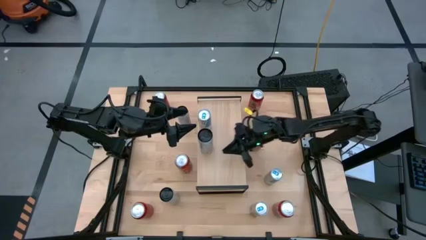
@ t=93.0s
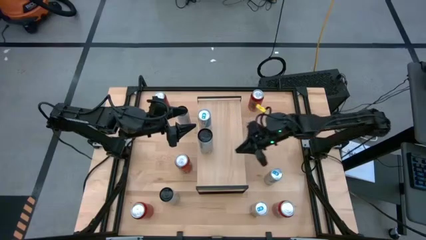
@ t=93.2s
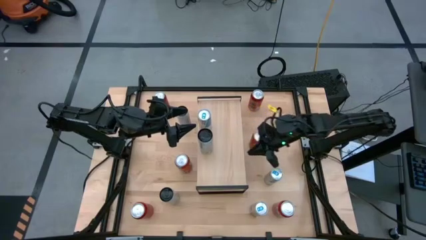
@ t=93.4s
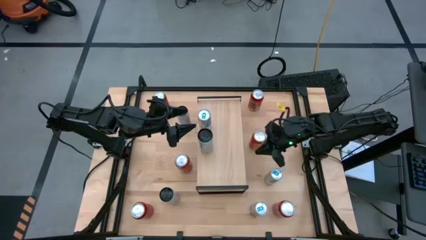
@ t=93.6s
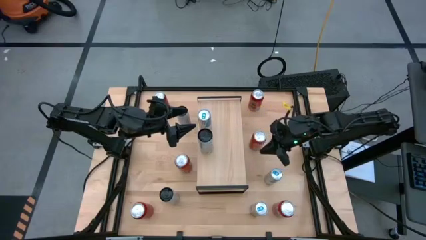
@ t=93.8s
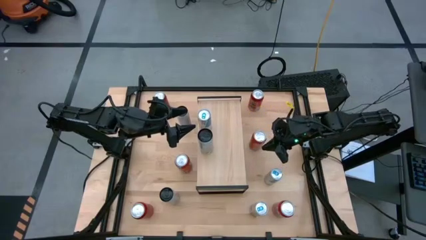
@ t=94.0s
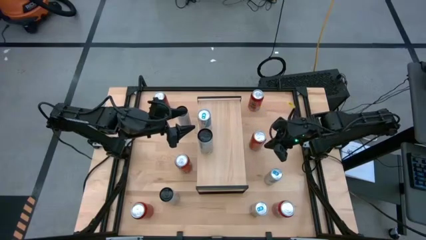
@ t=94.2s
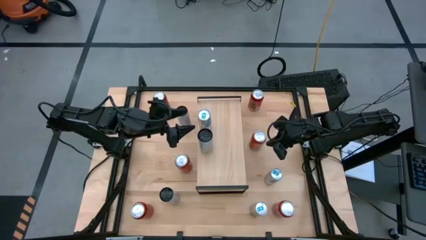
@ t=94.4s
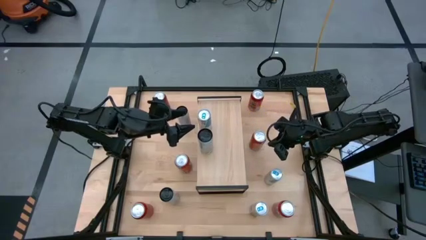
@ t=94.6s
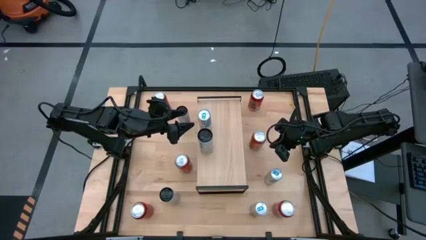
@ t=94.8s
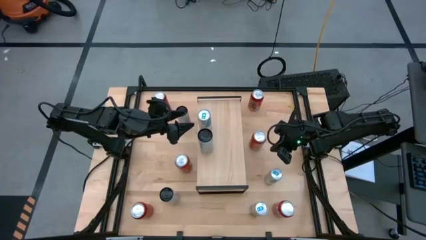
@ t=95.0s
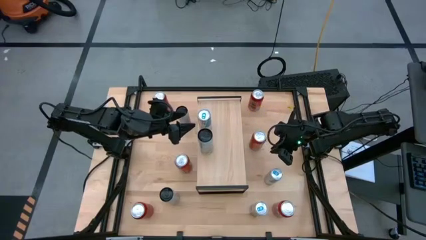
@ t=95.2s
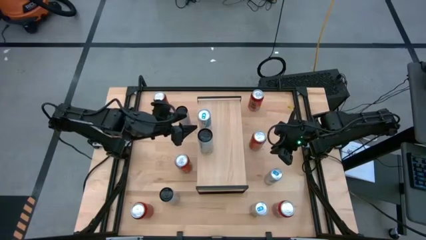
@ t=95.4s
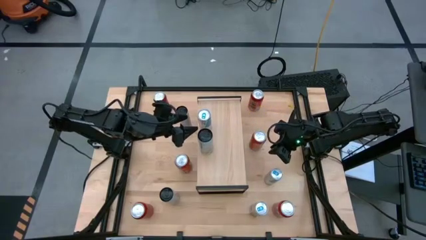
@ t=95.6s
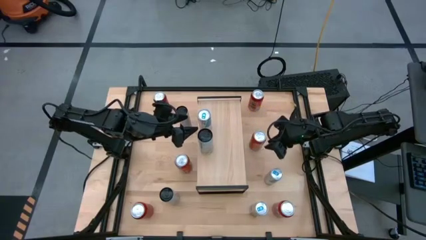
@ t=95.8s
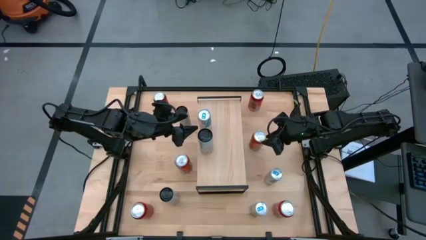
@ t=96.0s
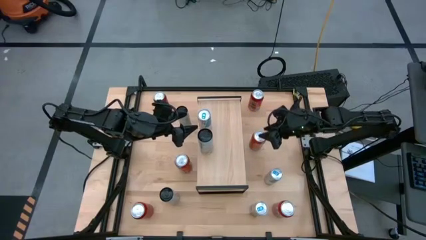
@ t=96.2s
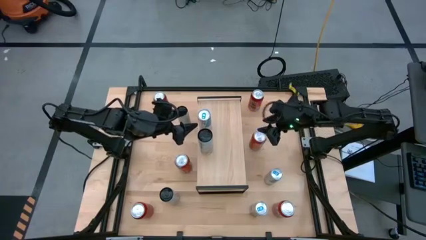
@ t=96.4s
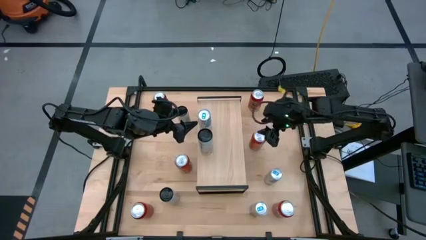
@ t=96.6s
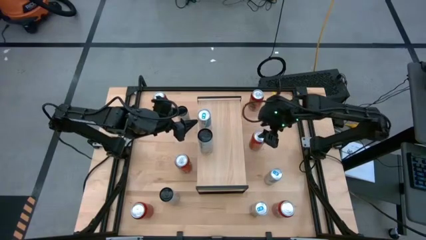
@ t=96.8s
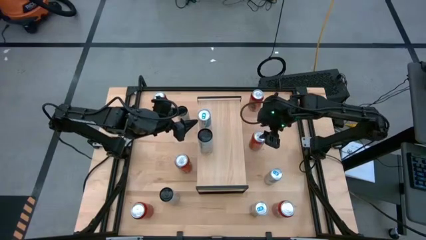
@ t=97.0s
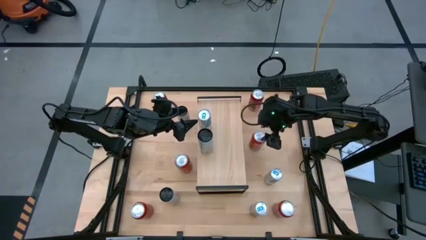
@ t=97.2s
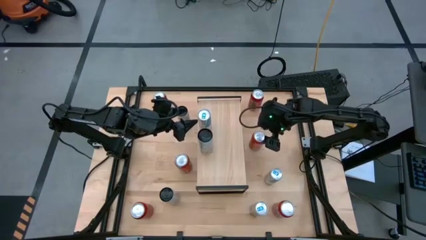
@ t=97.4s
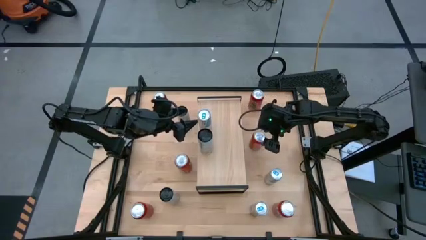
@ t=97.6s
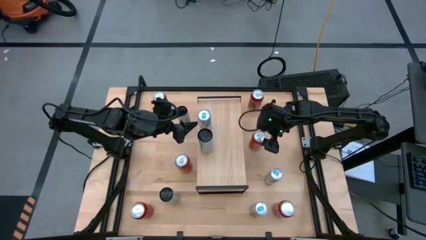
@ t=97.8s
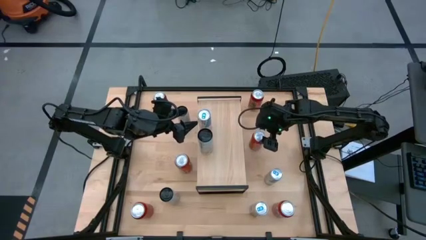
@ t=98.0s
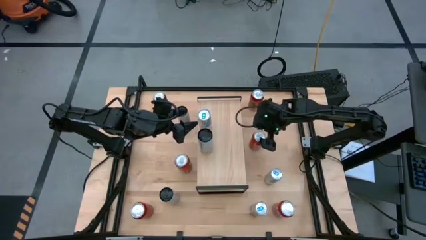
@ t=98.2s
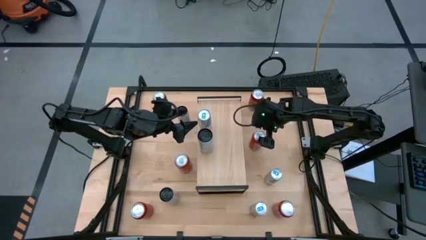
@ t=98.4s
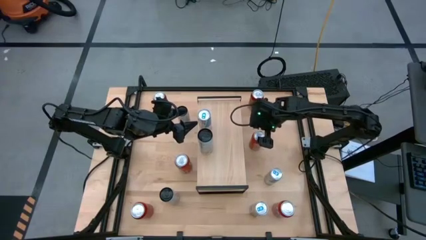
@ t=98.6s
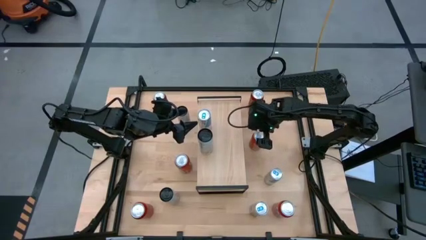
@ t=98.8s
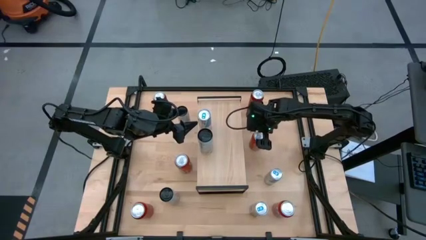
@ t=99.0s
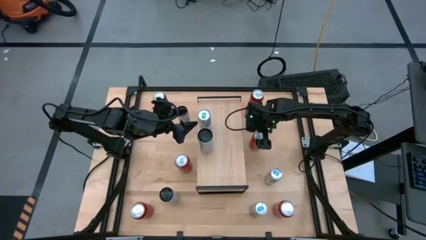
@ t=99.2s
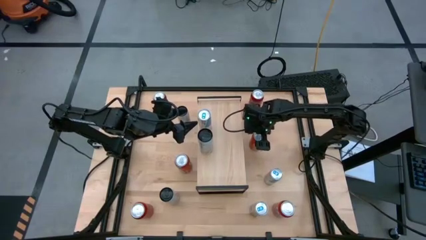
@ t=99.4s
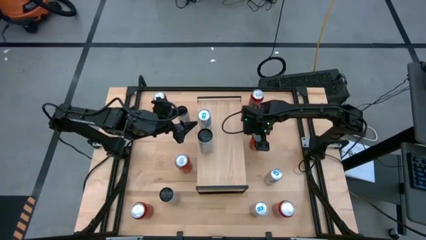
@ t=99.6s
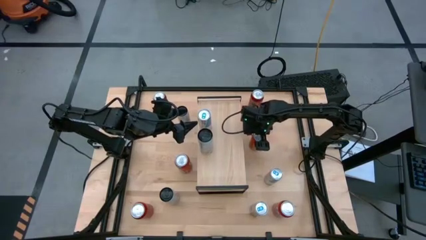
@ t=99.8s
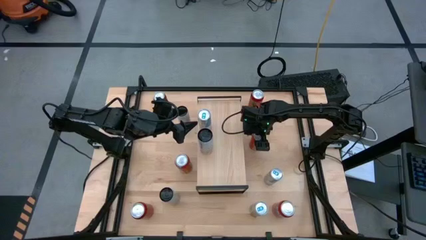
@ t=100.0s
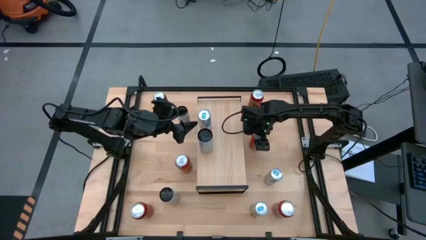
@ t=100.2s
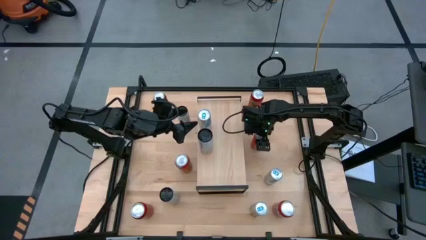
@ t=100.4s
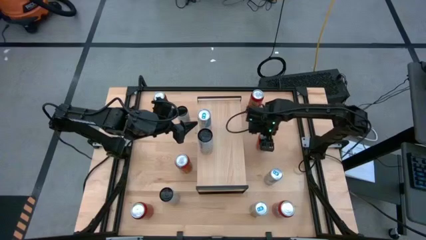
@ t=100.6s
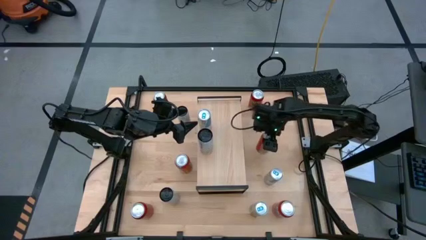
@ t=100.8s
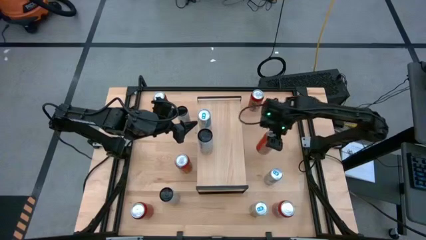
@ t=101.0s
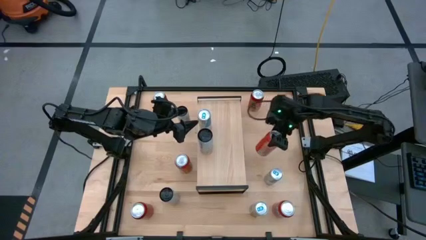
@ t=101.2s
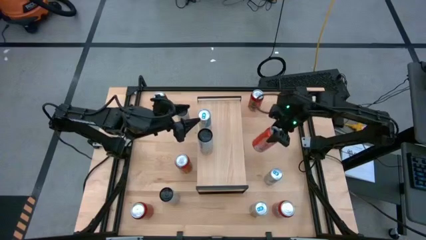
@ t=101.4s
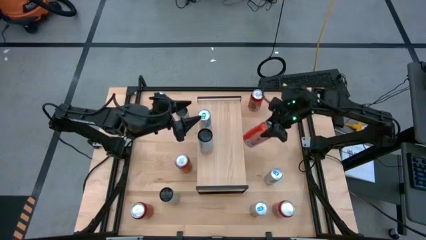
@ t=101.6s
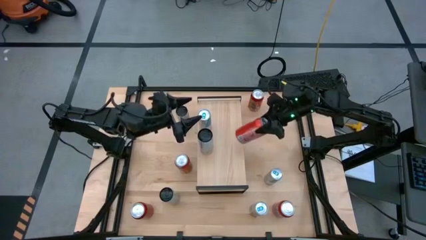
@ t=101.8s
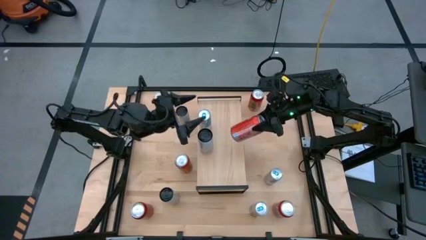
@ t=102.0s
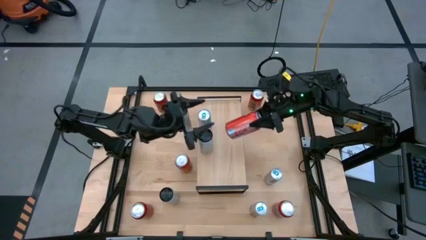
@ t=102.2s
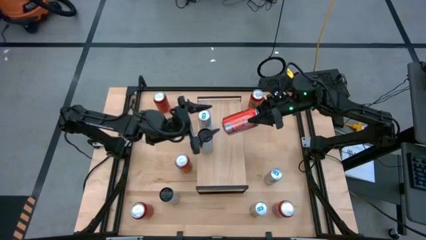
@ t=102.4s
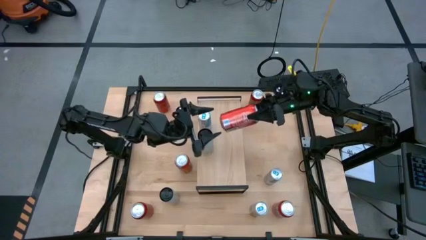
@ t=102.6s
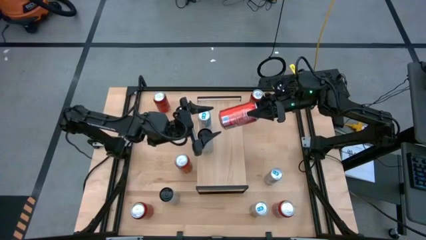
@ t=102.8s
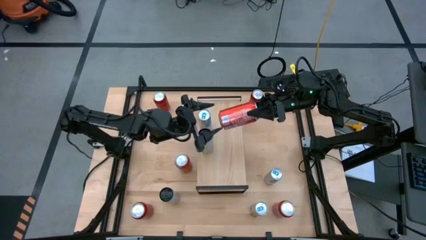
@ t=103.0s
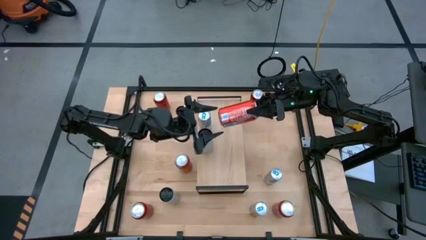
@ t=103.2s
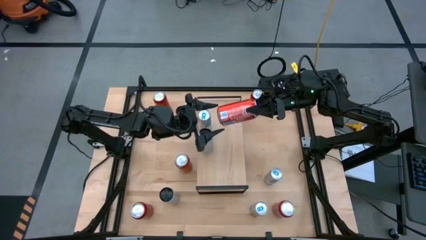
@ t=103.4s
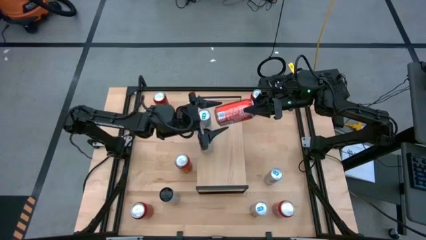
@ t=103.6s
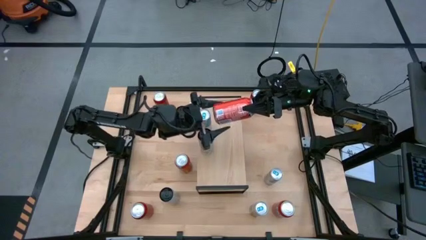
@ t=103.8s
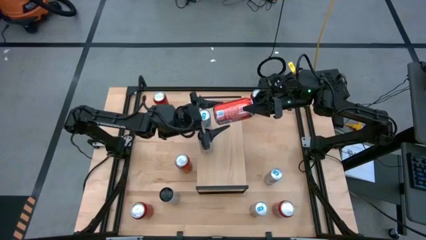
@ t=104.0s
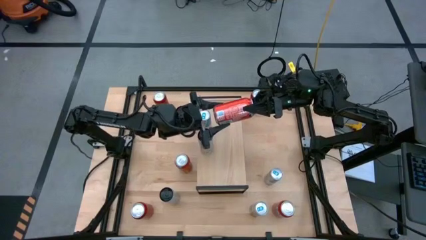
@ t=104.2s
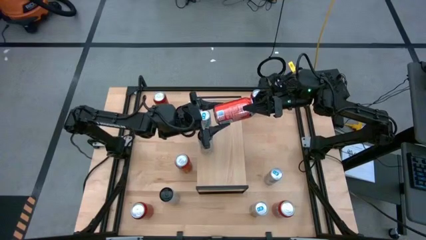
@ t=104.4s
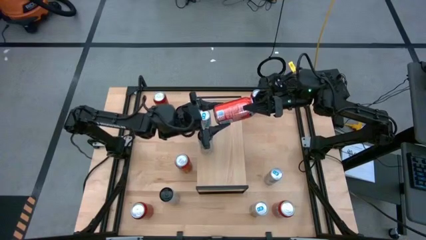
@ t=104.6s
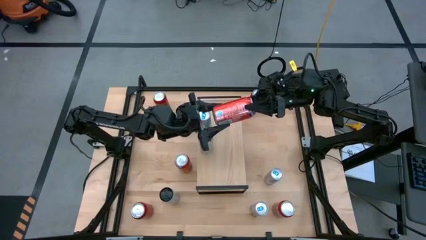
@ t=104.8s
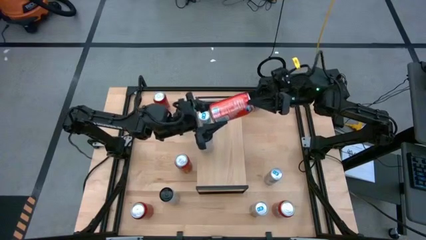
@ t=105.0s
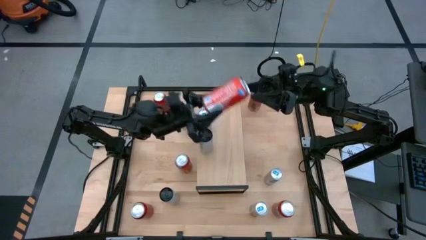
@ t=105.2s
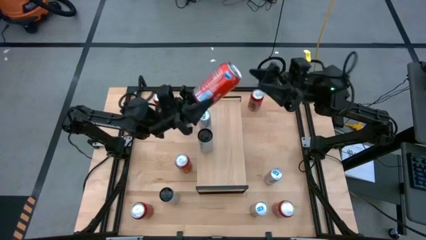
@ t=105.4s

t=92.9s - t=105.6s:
Task: Place canned beverage on shelf
Put the top right orange soda can on the shelf
